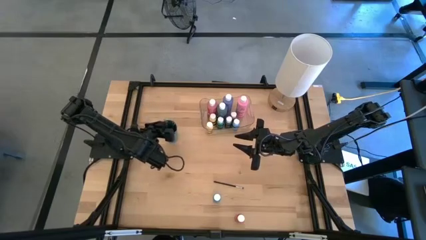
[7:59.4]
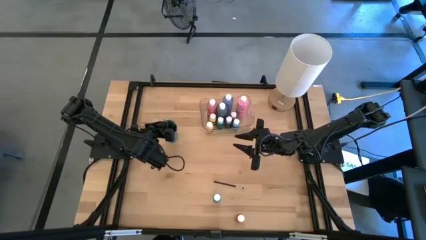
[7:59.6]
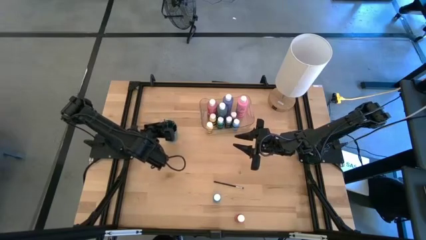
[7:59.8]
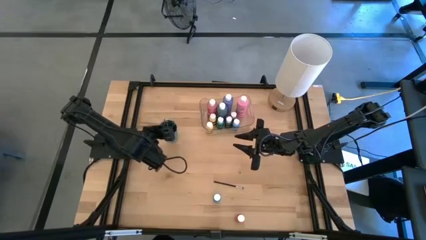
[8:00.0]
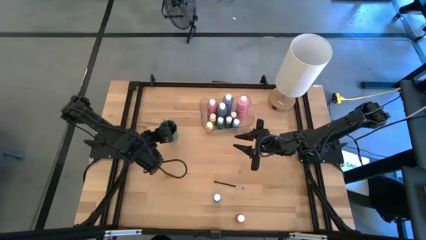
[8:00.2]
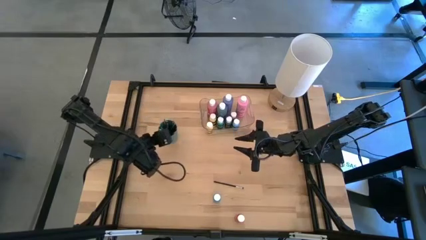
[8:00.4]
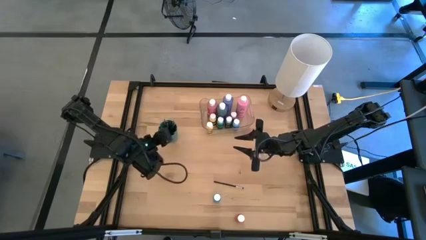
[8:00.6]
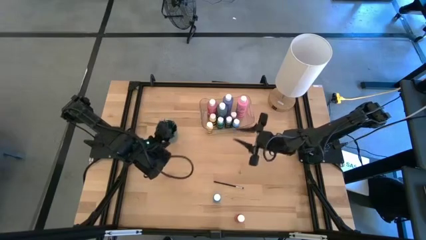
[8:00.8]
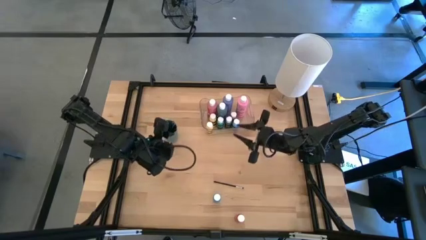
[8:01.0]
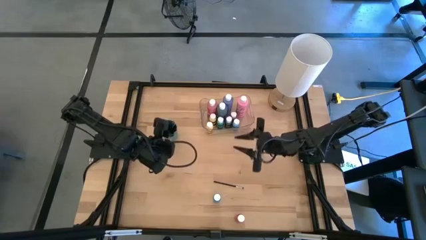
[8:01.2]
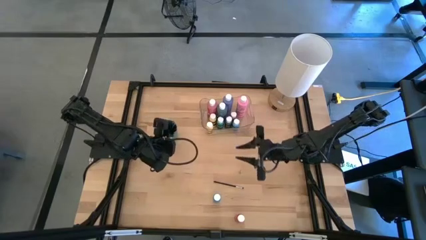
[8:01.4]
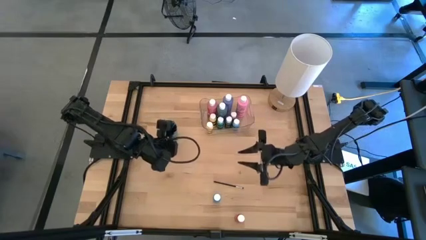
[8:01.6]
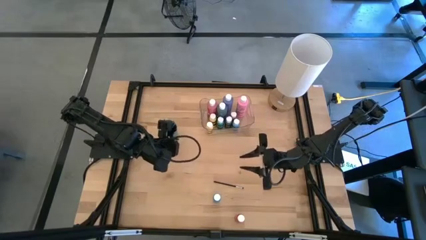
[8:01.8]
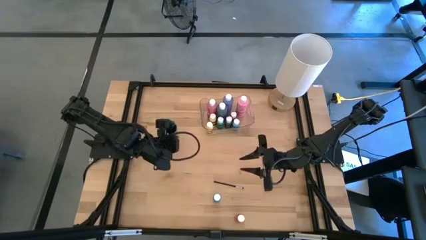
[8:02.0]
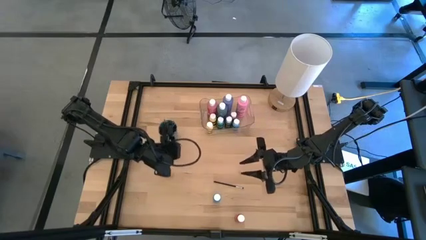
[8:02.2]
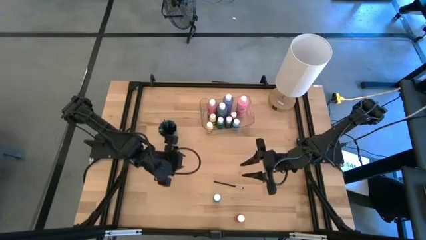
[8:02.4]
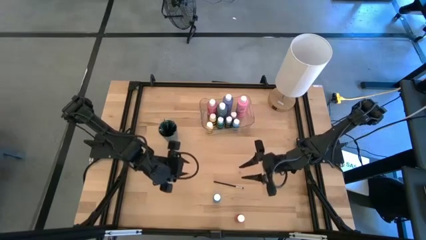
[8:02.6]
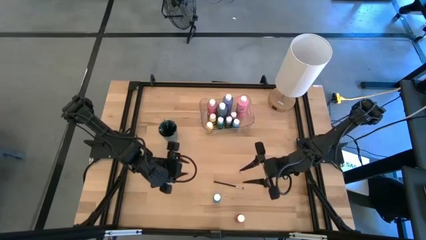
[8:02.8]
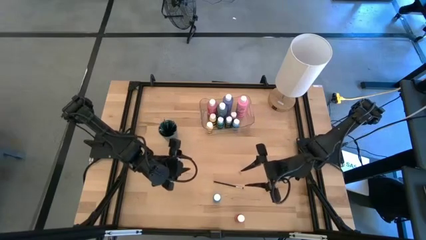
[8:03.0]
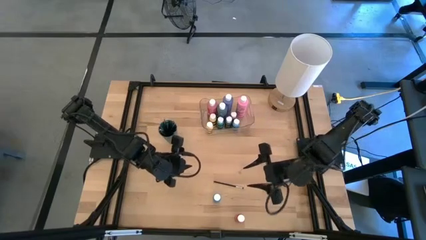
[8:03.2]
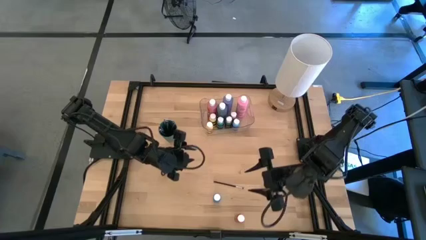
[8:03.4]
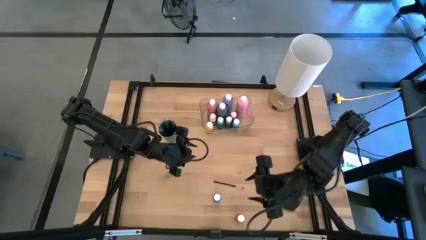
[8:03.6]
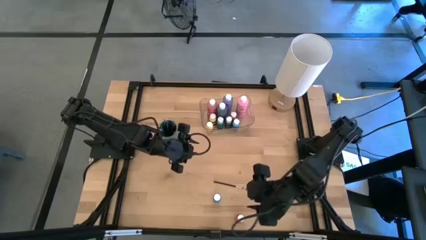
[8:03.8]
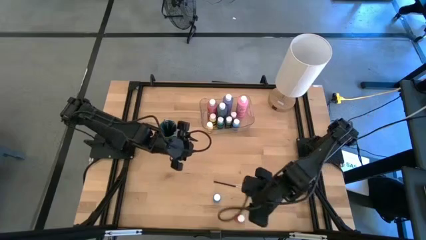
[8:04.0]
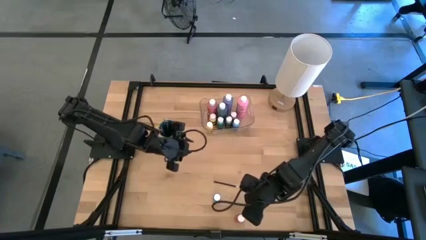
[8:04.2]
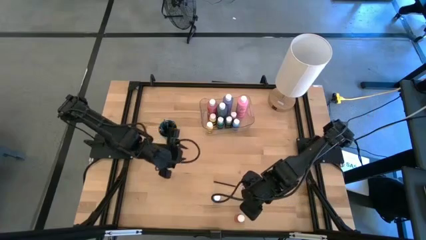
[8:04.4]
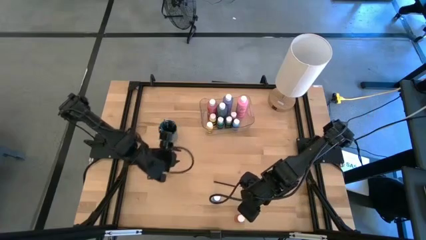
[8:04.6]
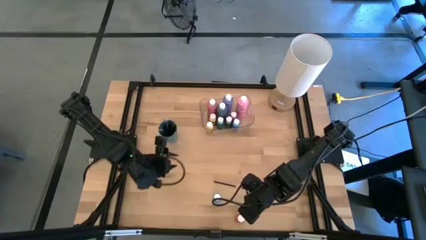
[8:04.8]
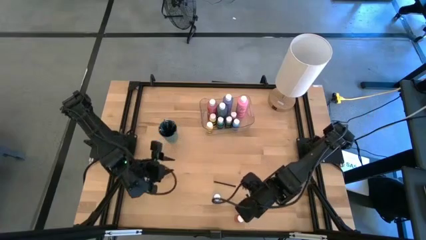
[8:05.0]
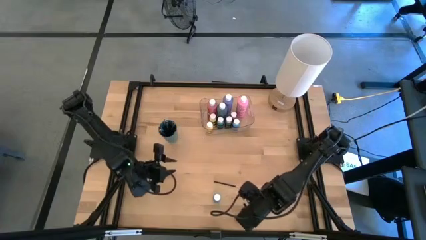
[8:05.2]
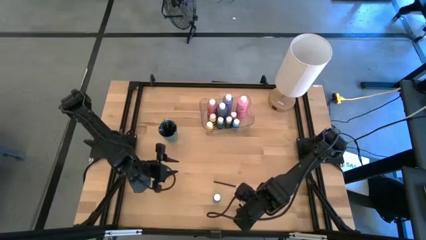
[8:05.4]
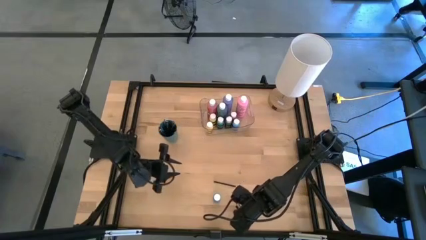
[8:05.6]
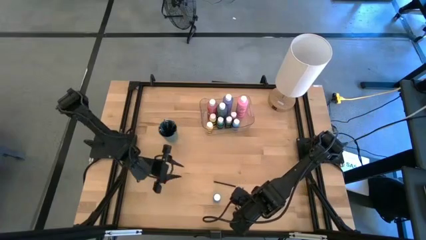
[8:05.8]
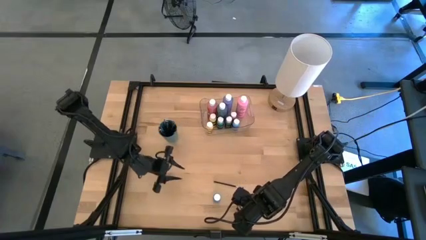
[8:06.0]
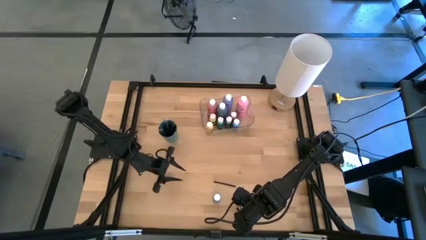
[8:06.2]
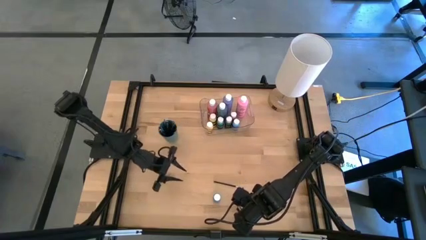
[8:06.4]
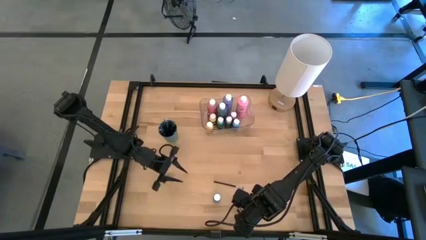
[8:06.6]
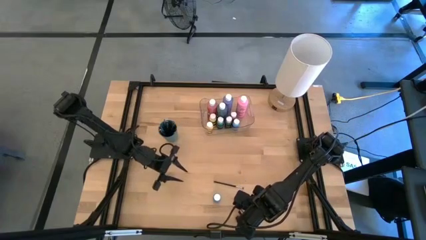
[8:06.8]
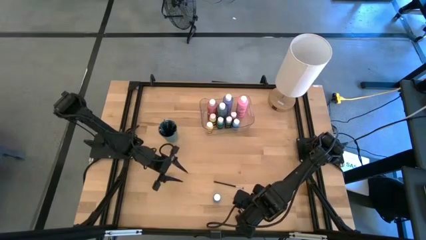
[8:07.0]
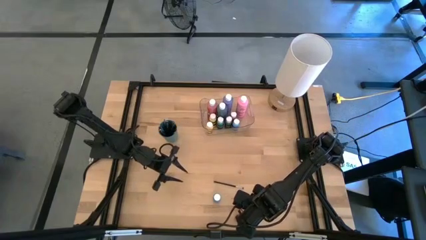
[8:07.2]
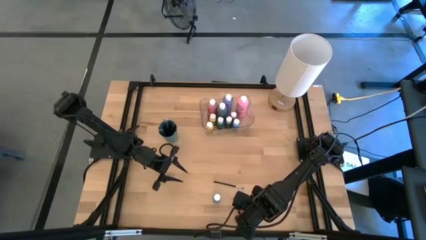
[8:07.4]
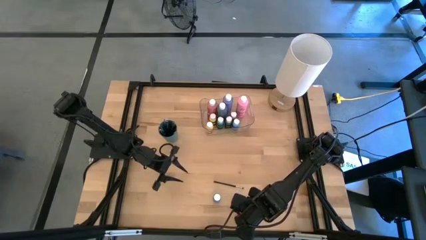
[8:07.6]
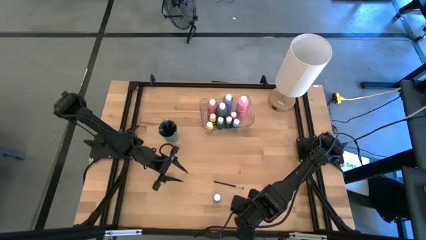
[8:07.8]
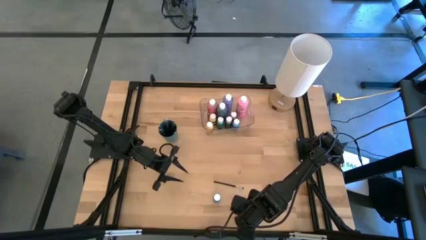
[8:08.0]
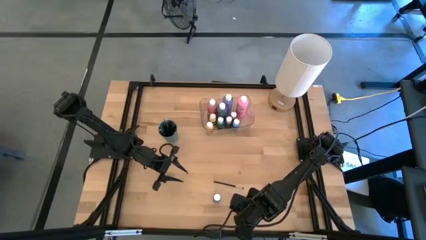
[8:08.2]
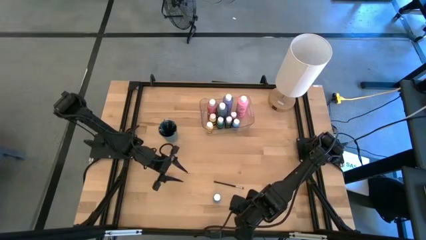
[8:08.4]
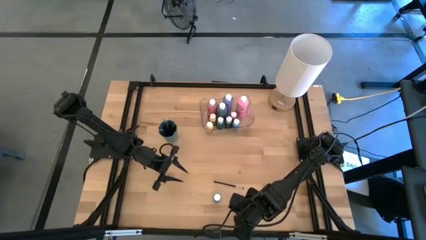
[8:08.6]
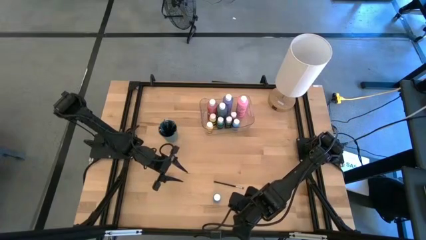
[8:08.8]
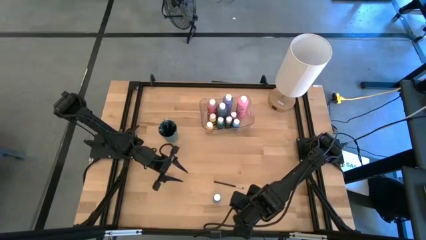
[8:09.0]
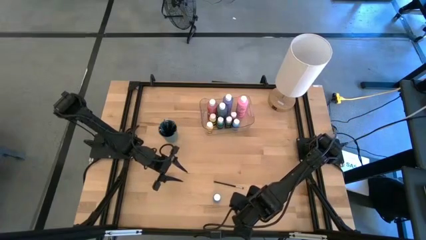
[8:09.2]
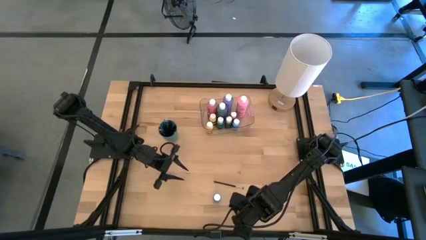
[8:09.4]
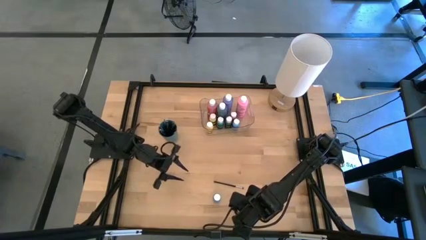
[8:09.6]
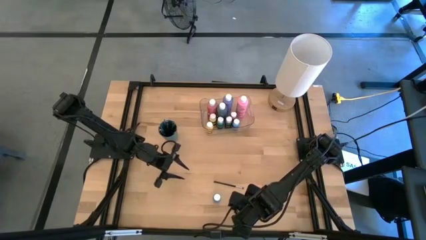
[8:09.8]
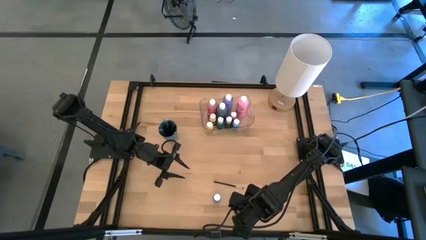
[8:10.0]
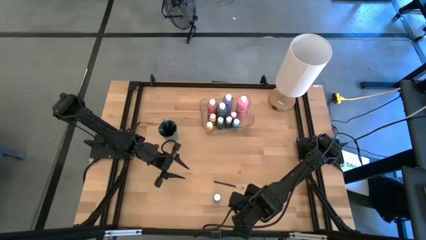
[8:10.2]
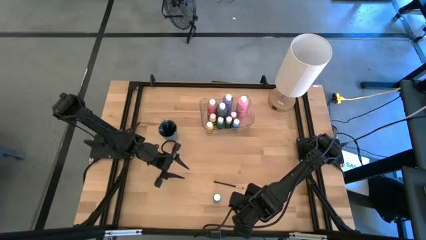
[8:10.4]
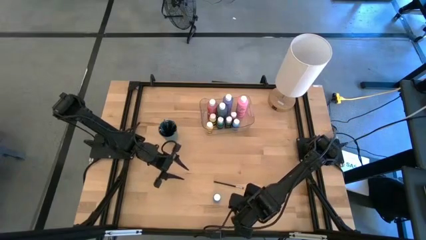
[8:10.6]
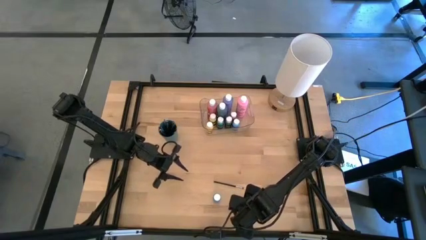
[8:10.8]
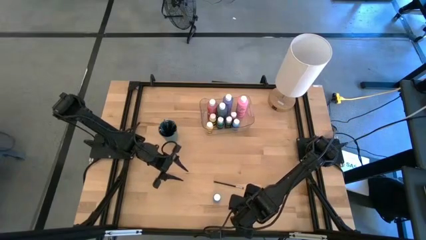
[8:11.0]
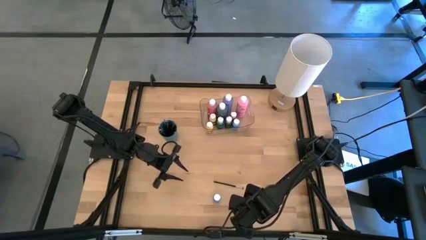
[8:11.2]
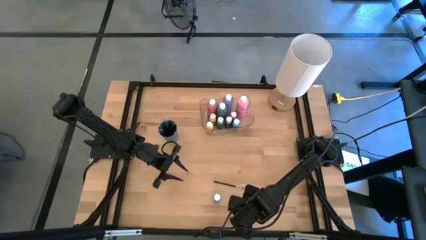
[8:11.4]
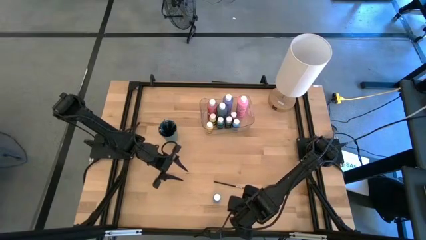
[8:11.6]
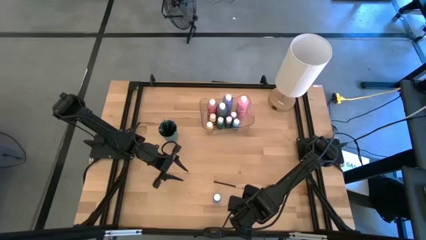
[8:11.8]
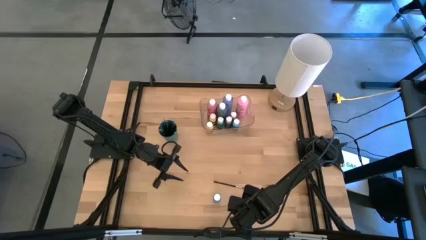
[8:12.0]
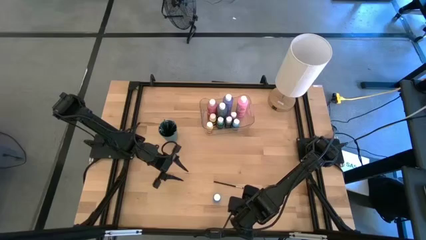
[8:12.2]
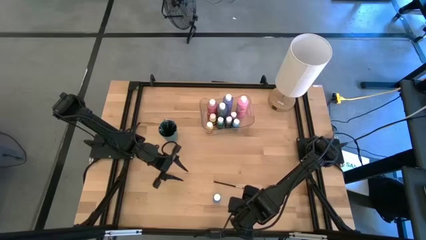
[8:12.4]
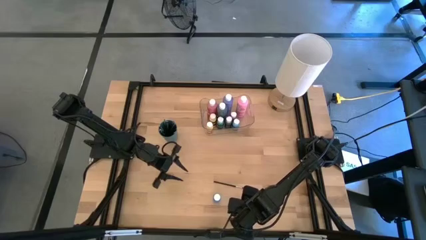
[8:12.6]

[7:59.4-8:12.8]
Task: Pick & Place Paint Supplies
Put the red paint bottle into the transparent bin

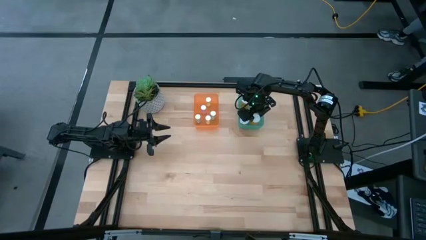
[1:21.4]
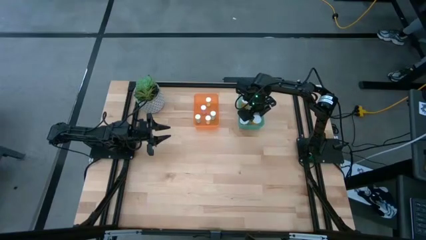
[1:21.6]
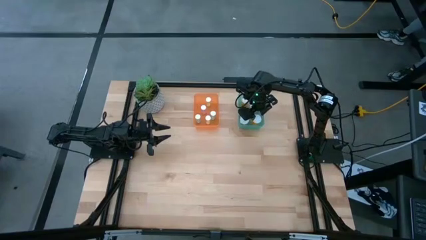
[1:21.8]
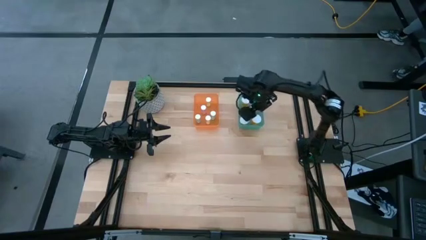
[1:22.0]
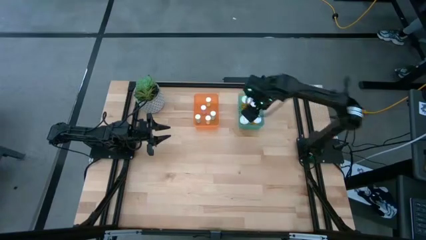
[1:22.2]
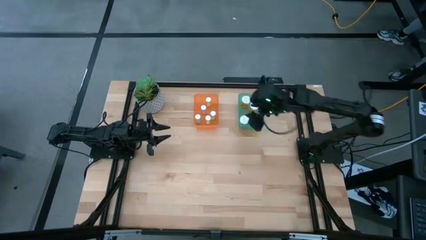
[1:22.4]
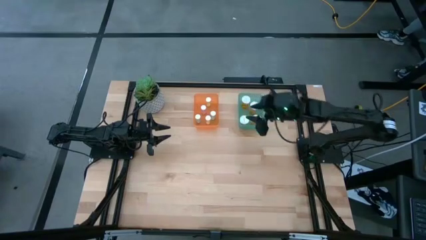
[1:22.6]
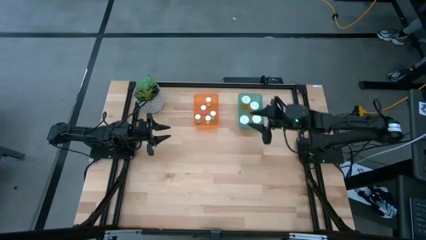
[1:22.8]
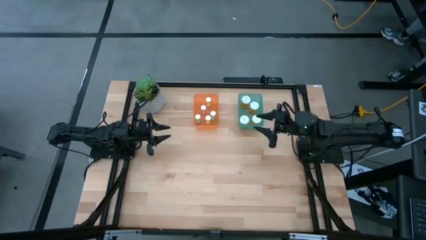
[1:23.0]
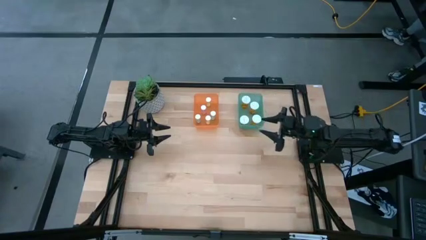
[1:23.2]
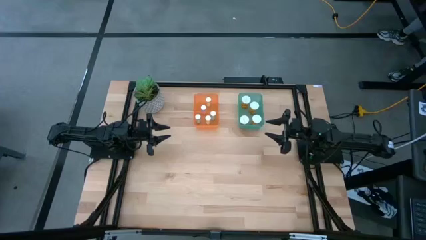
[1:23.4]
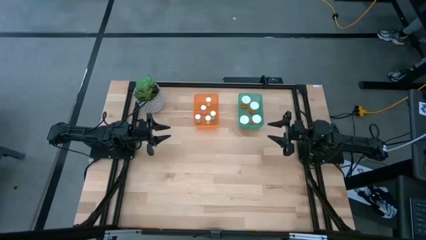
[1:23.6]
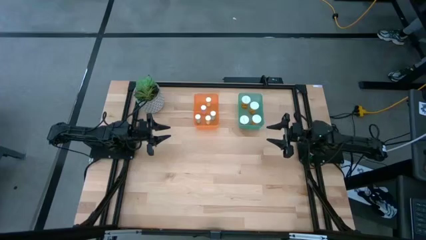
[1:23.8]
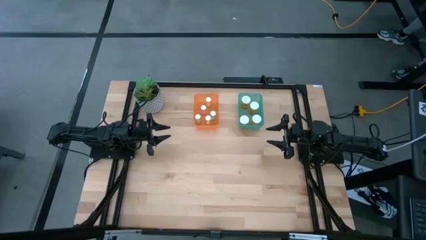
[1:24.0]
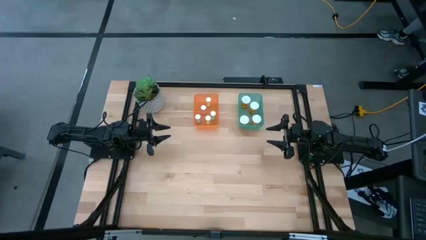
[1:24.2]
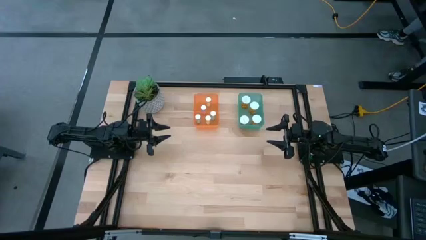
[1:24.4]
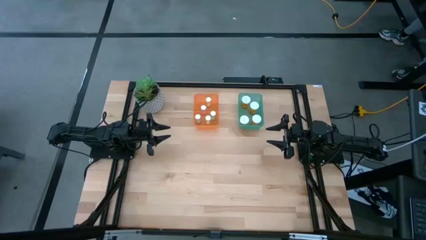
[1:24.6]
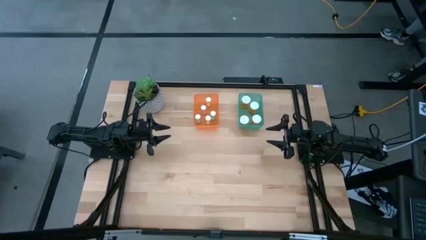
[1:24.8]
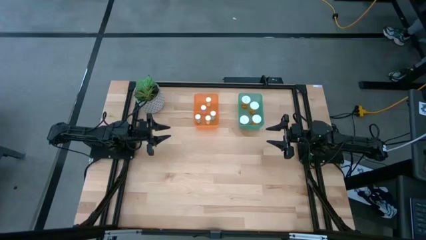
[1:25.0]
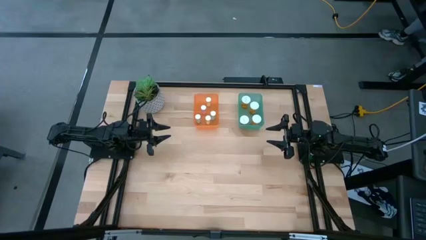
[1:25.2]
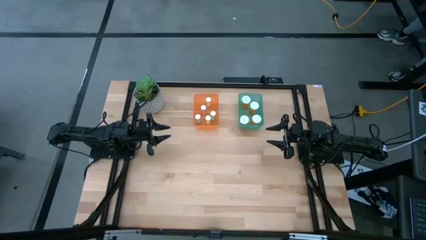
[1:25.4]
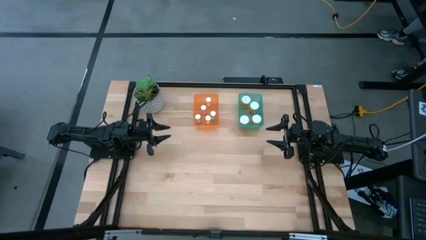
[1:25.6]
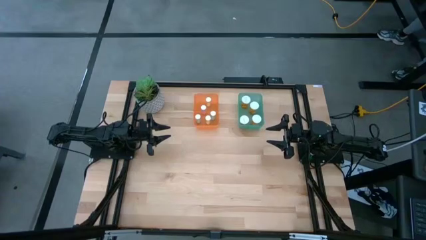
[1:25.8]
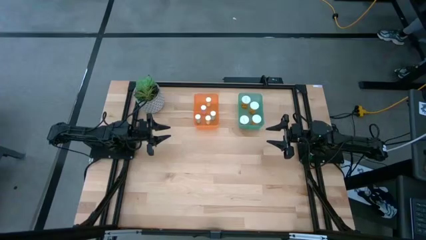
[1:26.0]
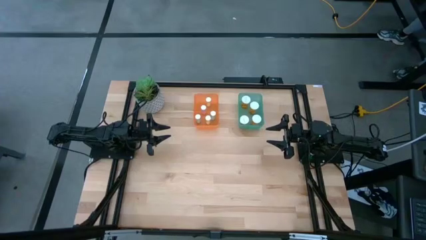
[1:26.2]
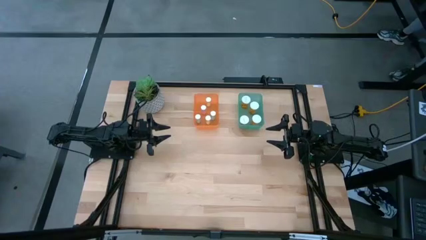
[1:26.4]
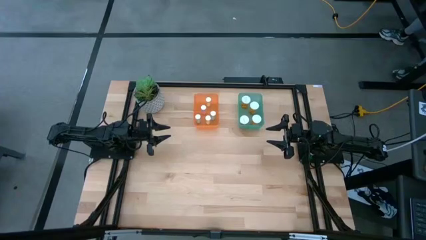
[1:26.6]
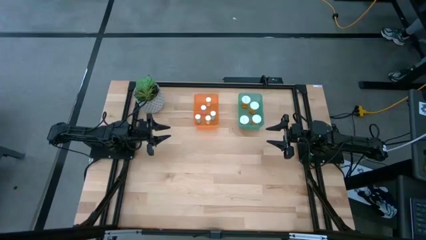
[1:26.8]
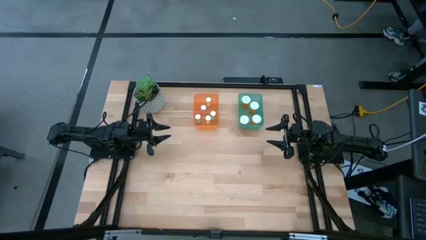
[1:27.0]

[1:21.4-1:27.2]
Task: Pick and place medicine bottles into bin by pill shape (circle, oval)
Return to Home Position
